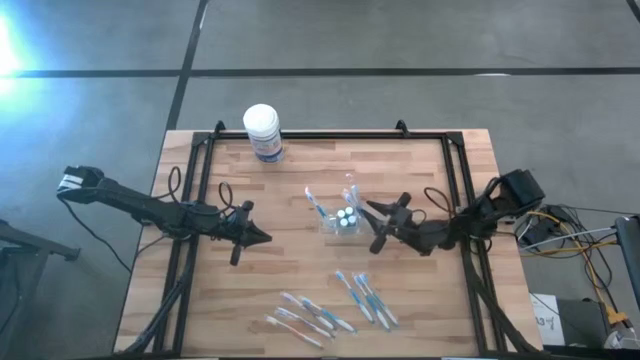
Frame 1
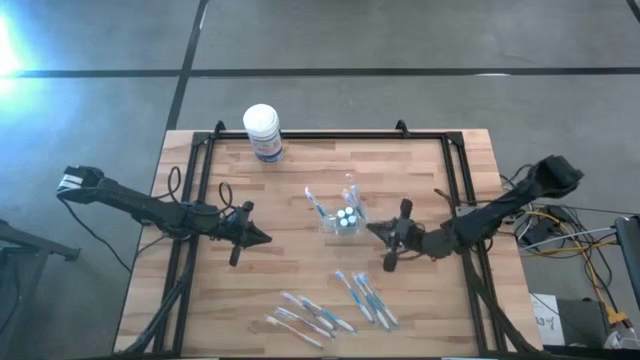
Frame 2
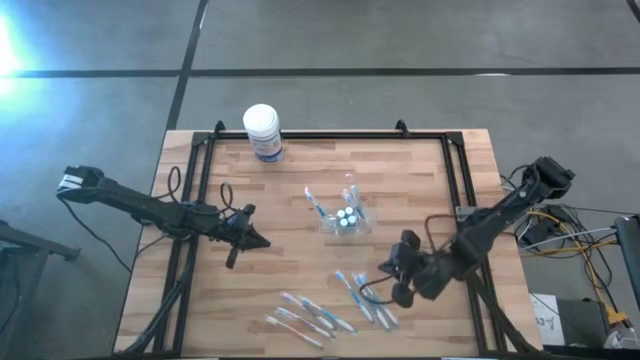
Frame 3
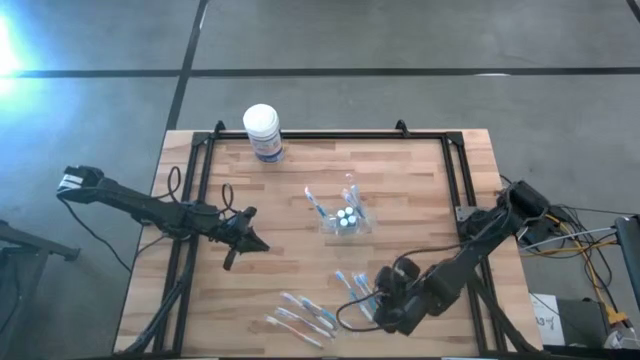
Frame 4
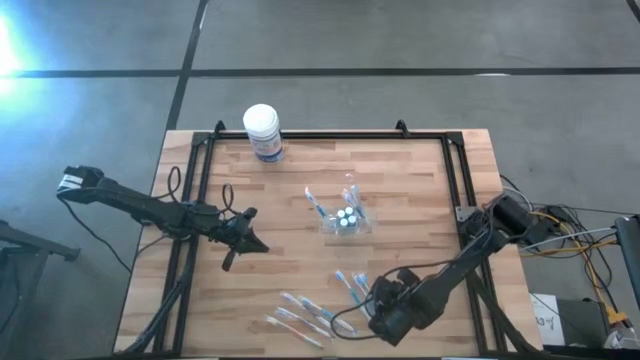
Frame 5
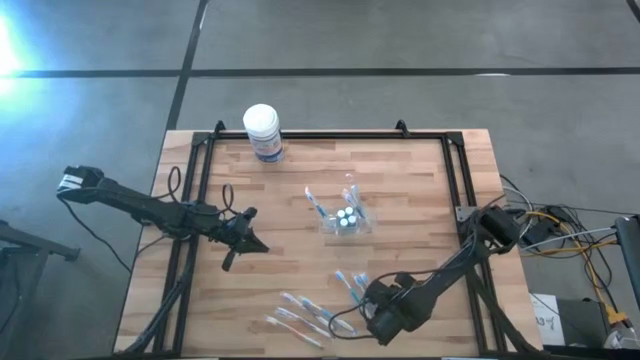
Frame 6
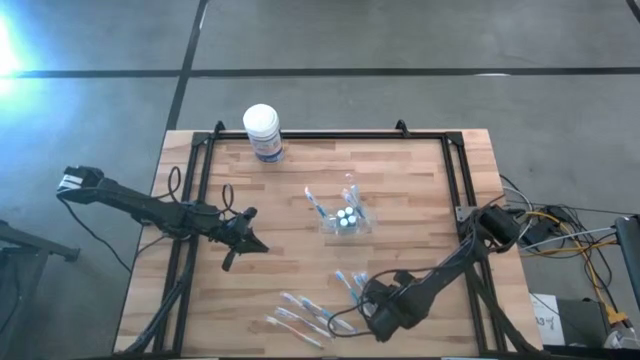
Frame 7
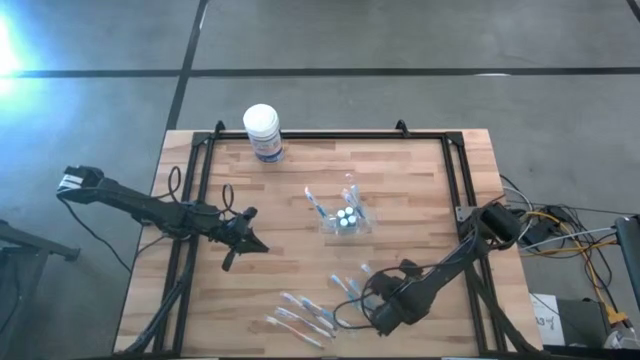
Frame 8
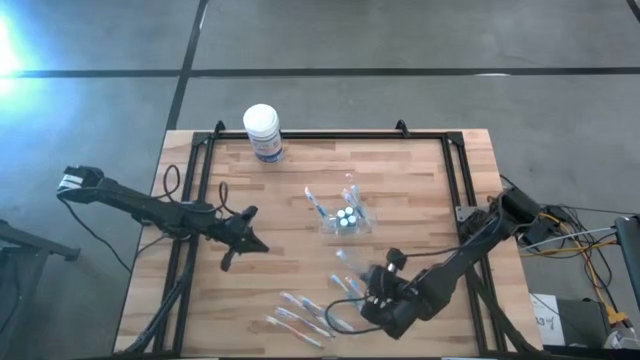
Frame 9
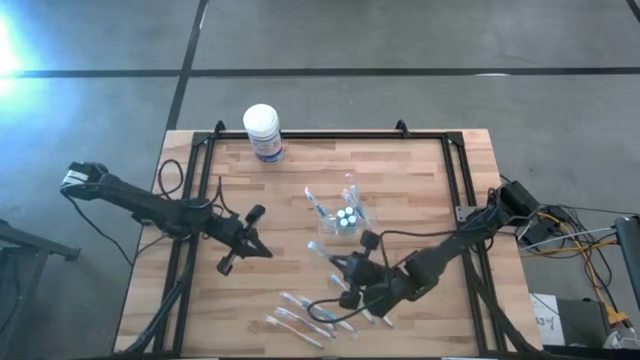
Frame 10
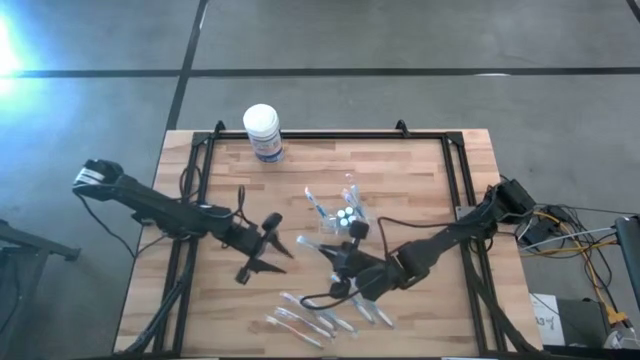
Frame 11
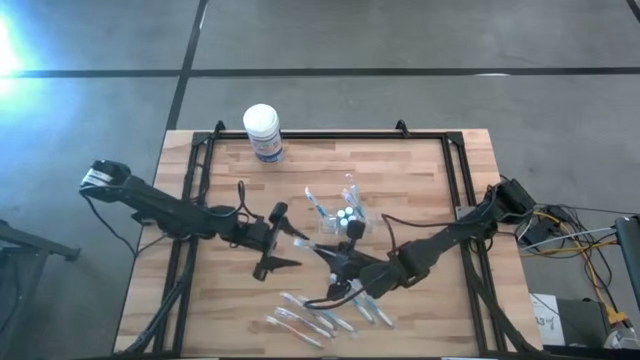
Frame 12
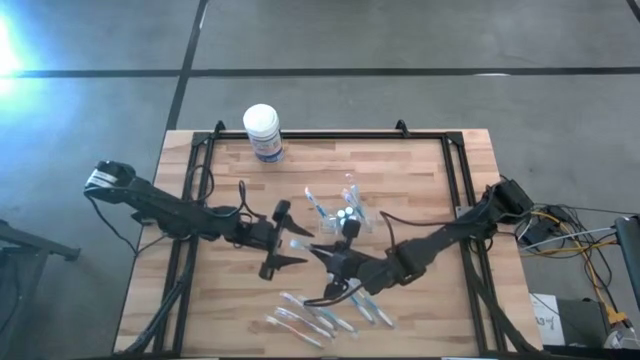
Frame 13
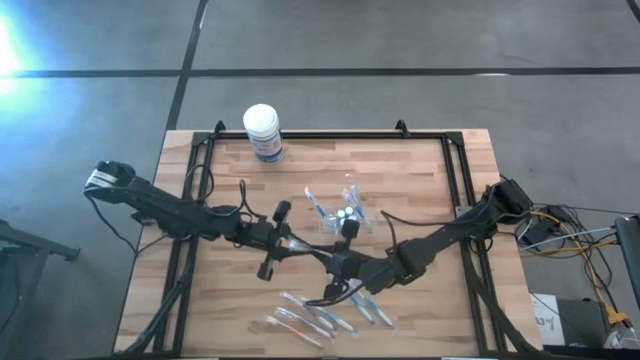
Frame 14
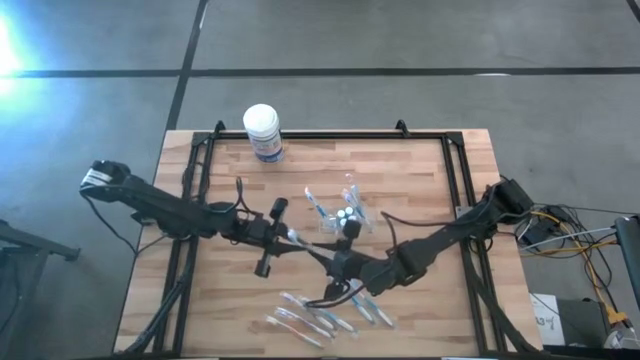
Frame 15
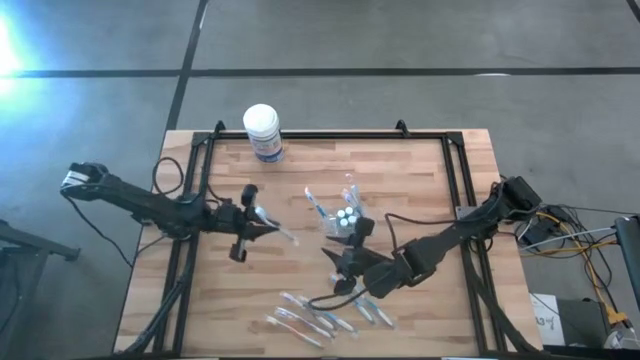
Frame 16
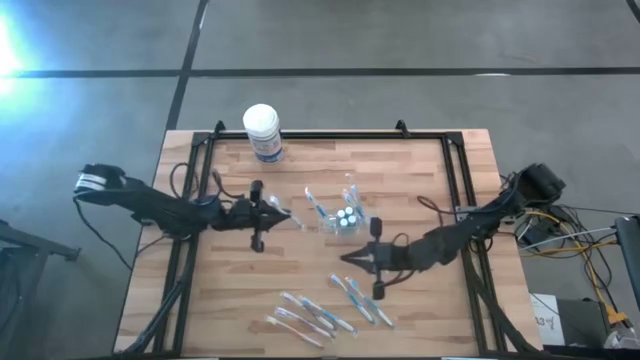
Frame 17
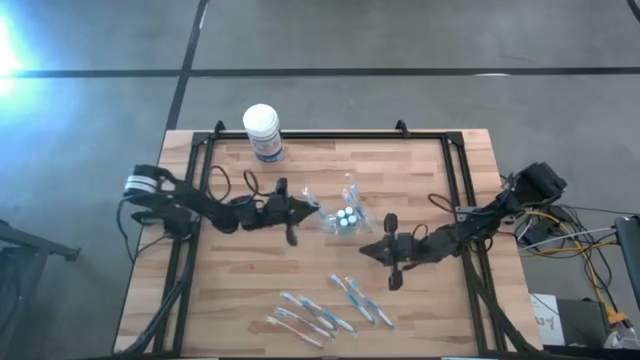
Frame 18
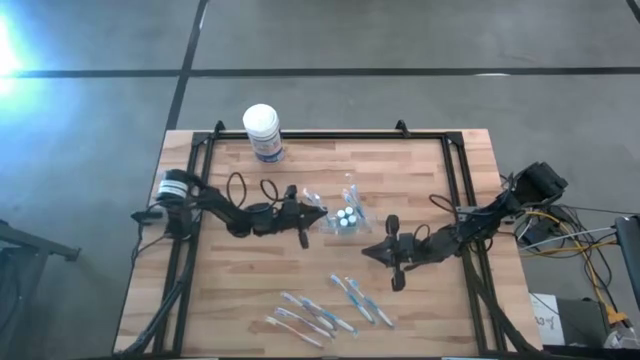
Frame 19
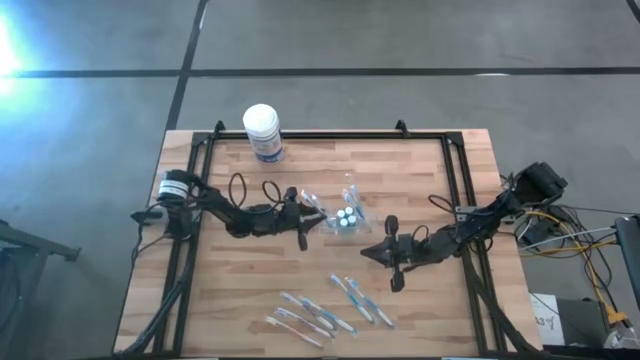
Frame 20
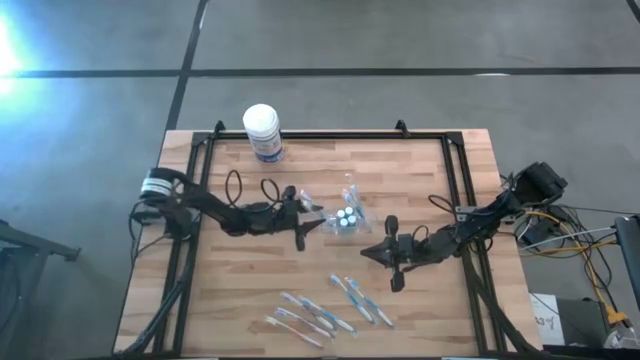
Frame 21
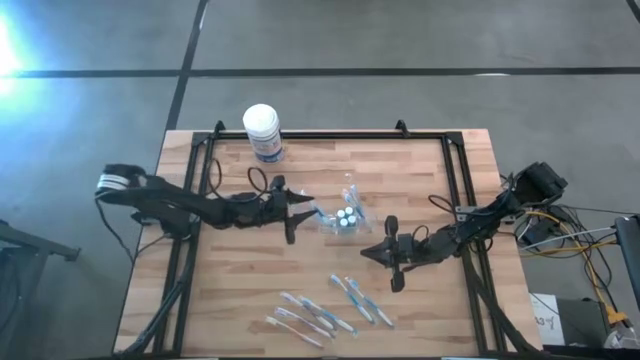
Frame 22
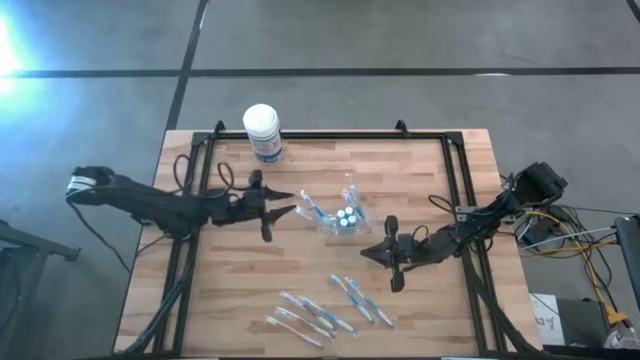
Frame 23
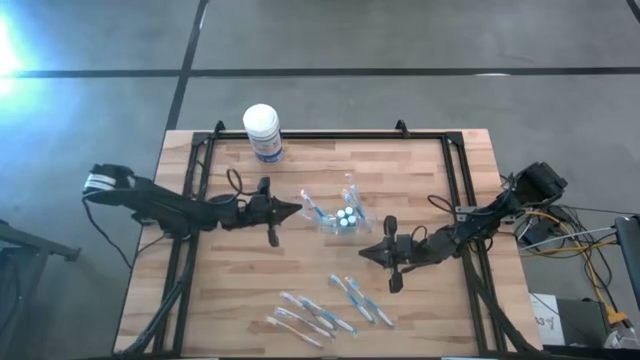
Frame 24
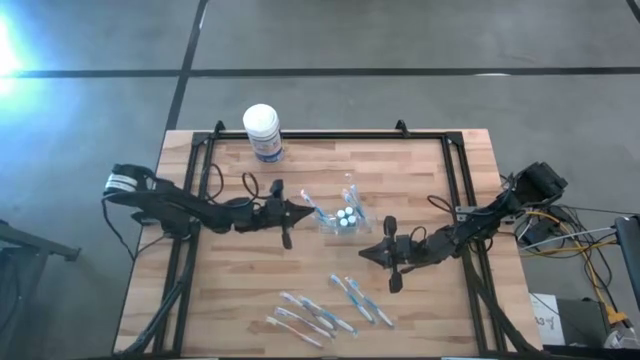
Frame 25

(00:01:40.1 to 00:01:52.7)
Task: Pick & Place toothbrushing station
Put the blue toothbrush into the transparent organizer

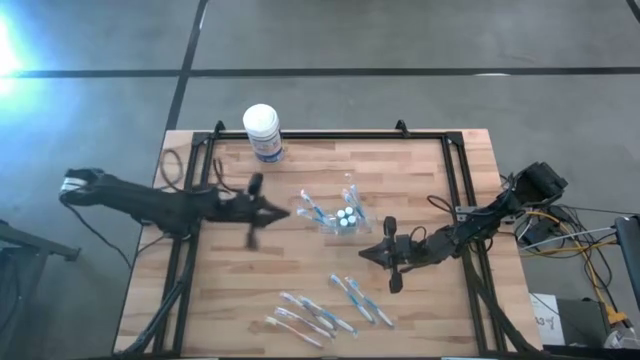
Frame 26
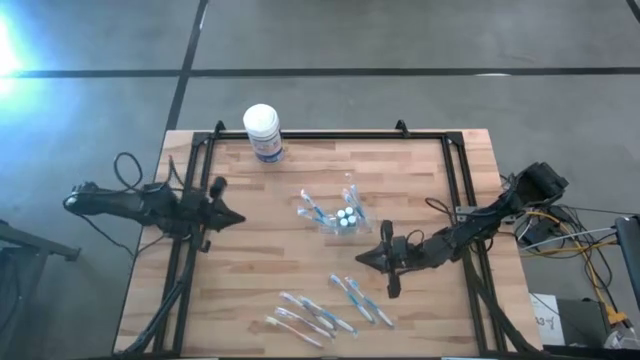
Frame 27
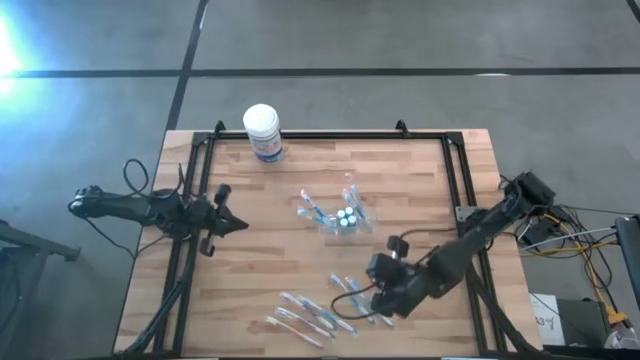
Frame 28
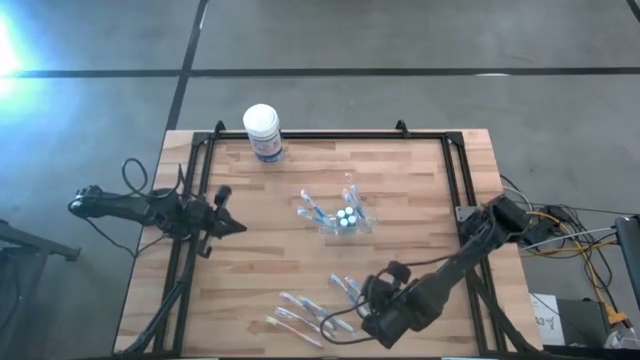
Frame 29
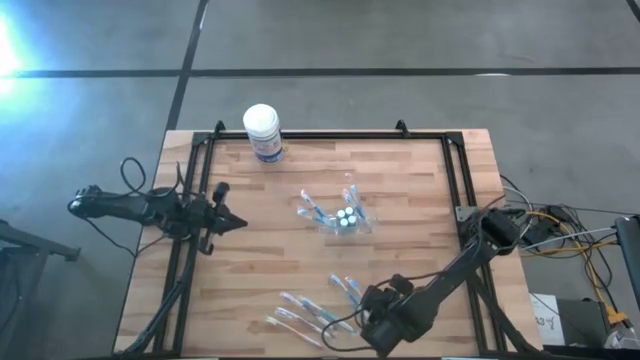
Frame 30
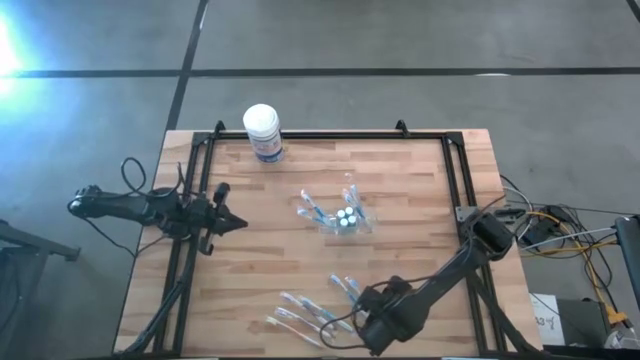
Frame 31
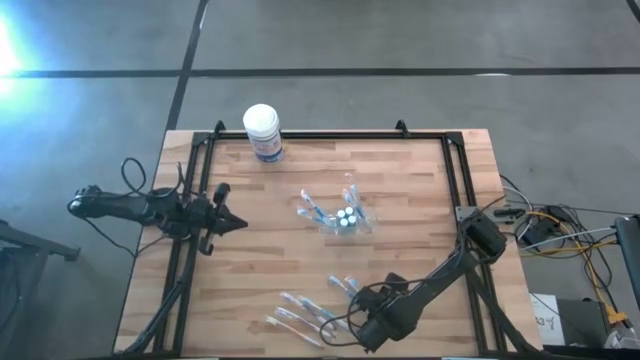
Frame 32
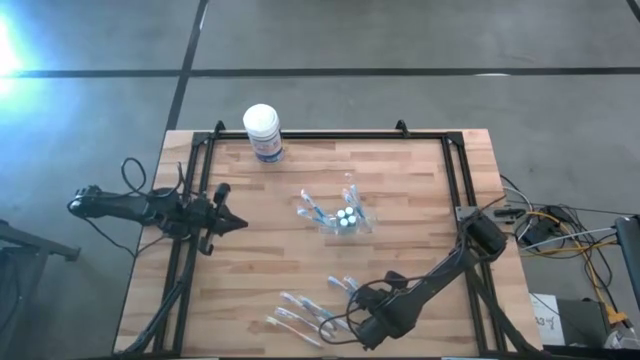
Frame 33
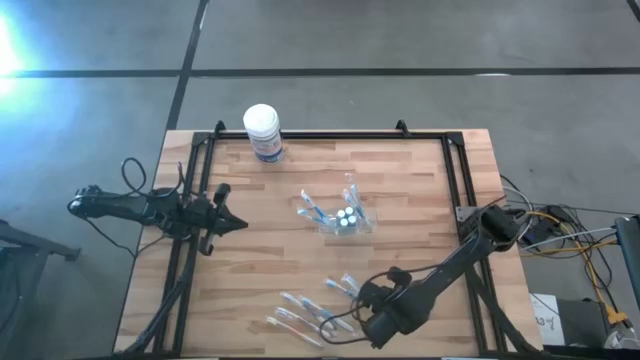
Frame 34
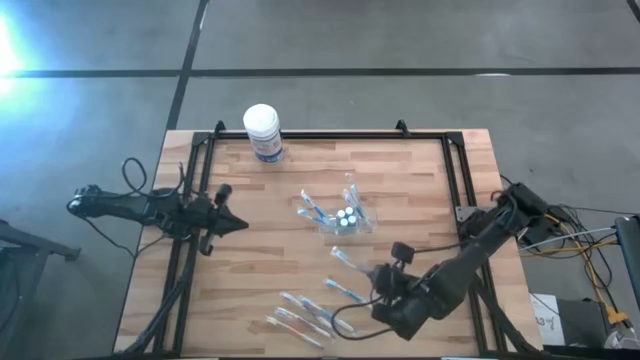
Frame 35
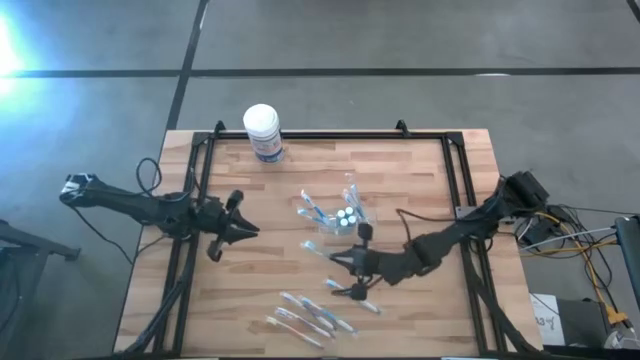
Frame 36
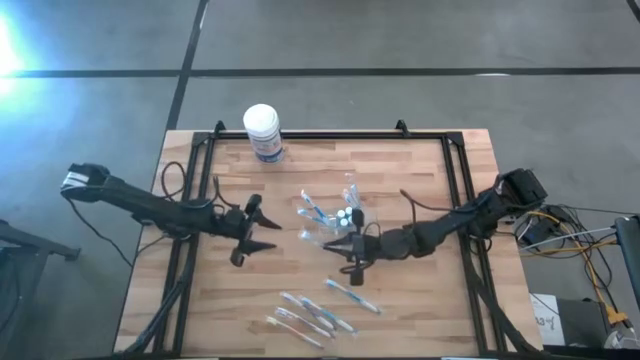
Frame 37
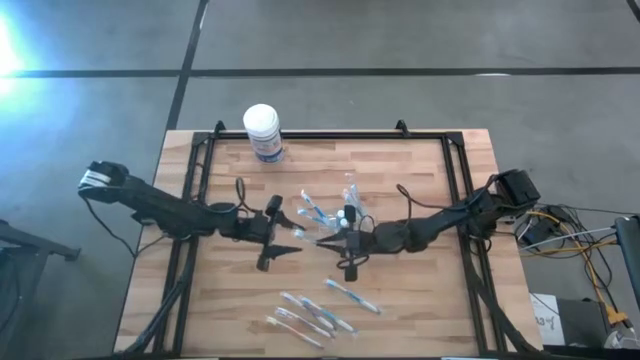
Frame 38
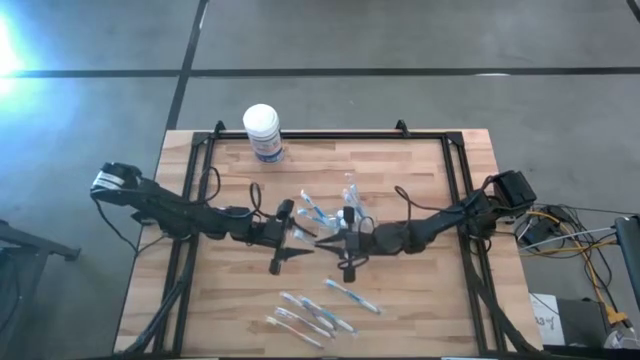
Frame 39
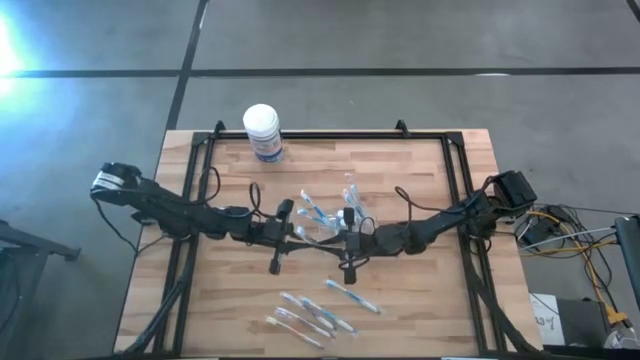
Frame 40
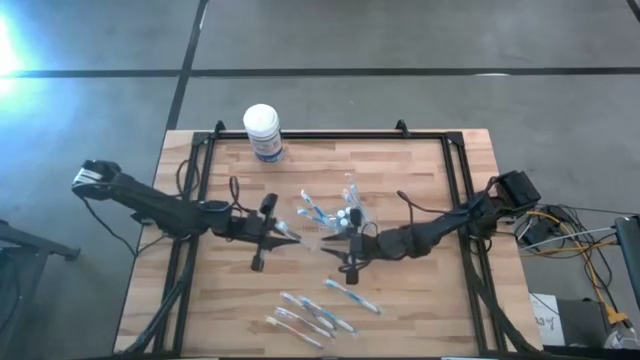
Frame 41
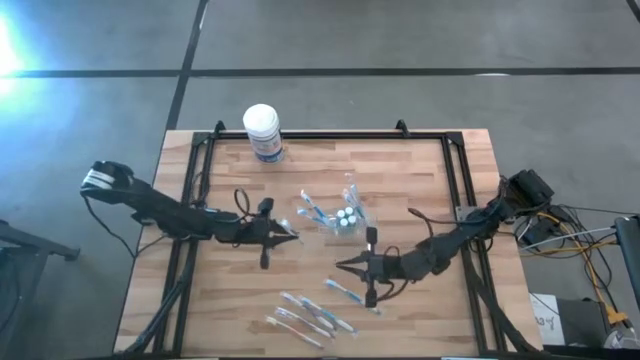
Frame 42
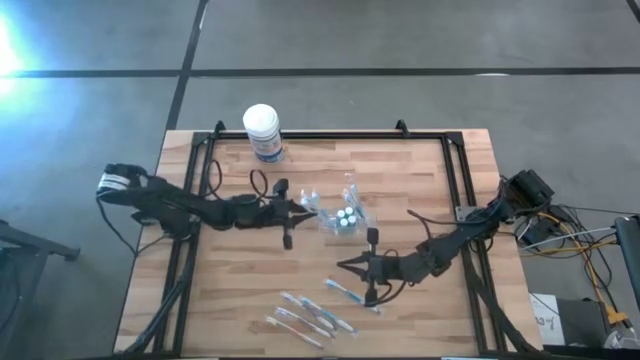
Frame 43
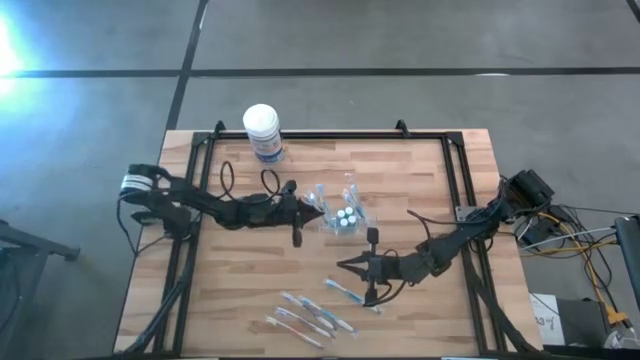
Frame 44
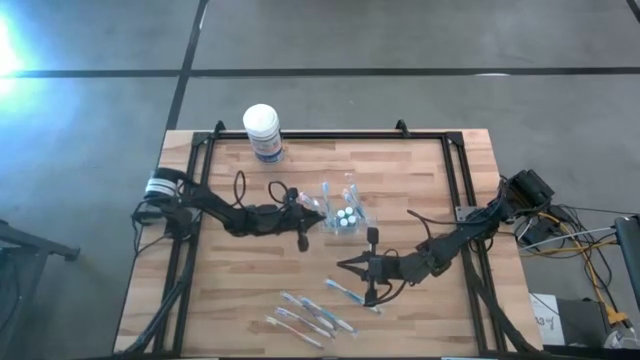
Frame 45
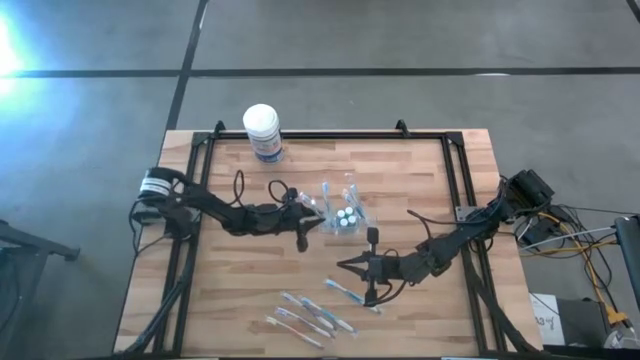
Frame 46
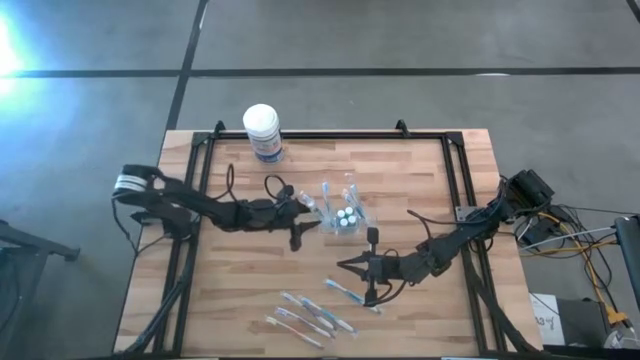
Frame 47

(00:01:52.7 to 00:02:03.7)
Put the blue toothbrush into the transparent organizer
